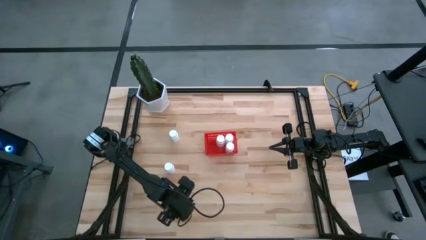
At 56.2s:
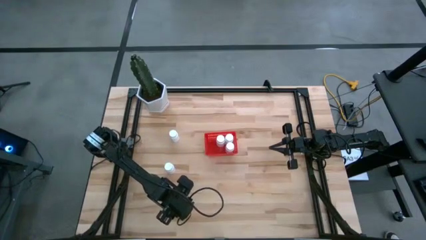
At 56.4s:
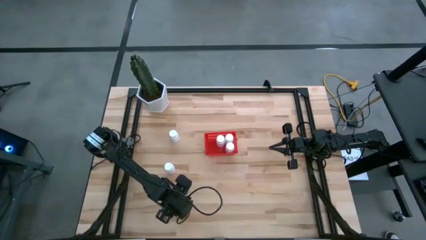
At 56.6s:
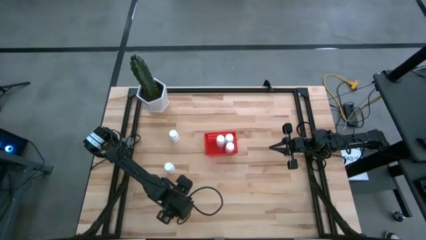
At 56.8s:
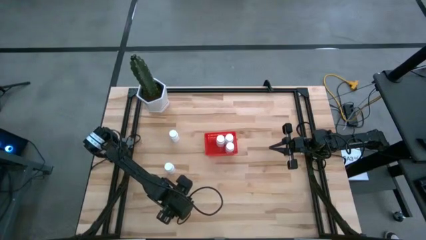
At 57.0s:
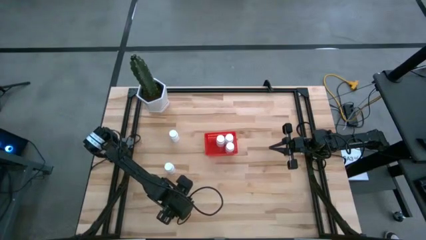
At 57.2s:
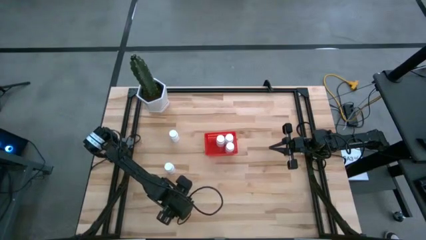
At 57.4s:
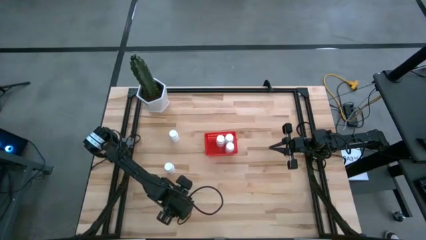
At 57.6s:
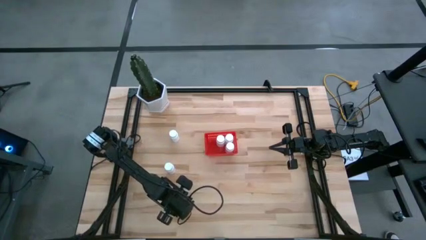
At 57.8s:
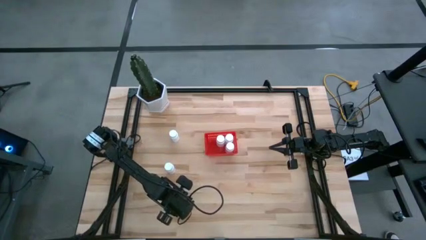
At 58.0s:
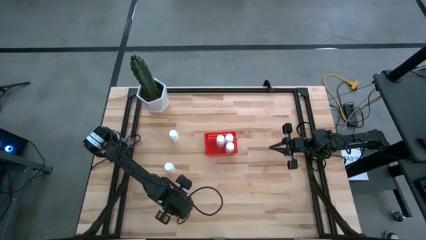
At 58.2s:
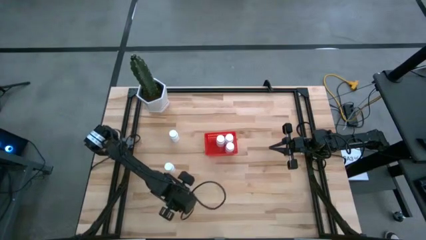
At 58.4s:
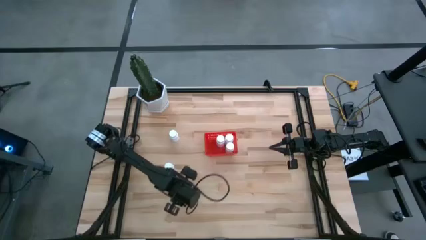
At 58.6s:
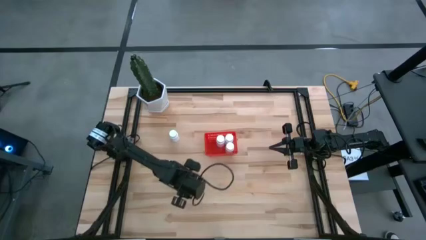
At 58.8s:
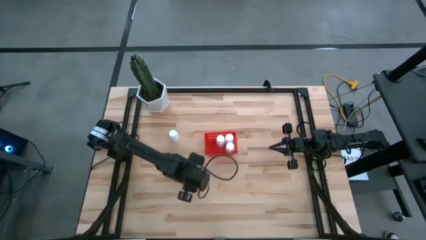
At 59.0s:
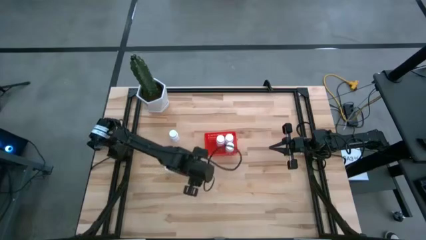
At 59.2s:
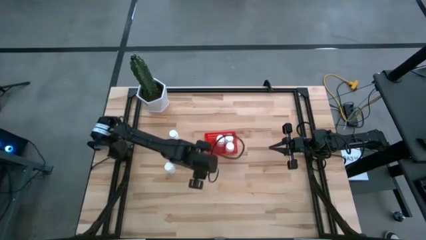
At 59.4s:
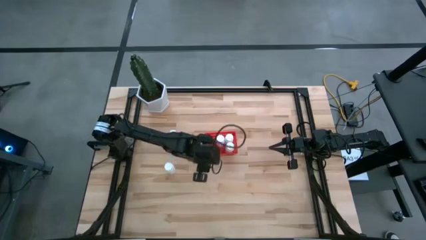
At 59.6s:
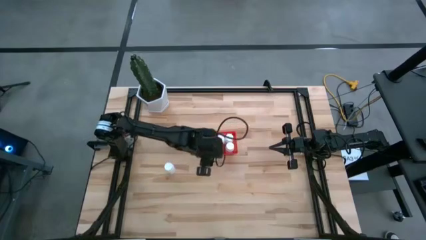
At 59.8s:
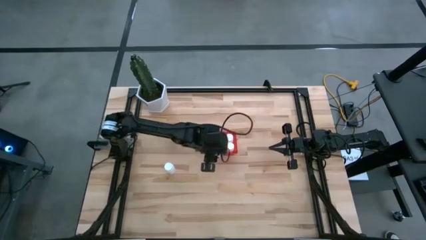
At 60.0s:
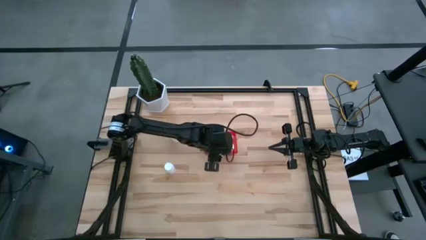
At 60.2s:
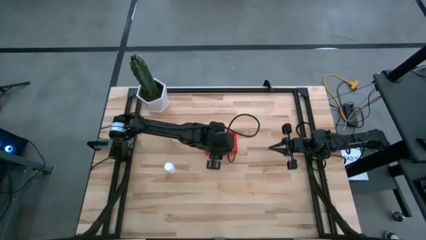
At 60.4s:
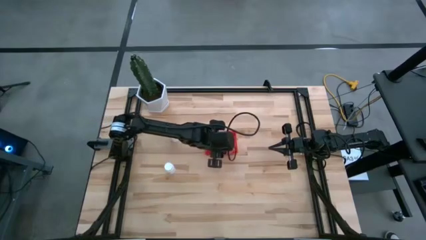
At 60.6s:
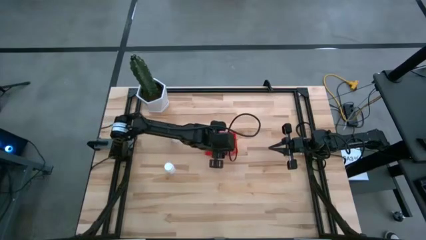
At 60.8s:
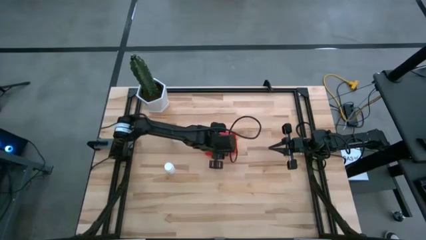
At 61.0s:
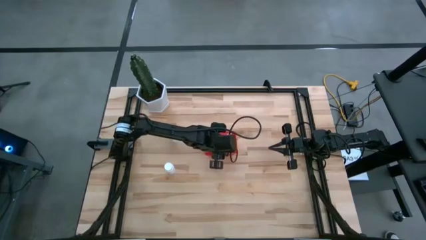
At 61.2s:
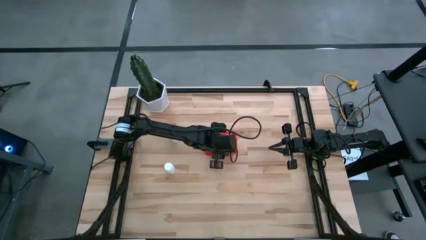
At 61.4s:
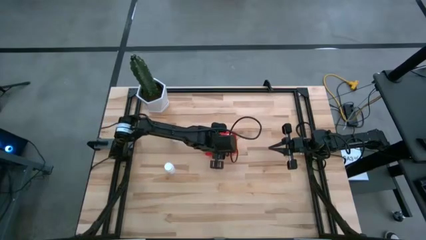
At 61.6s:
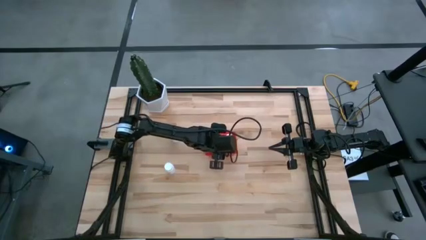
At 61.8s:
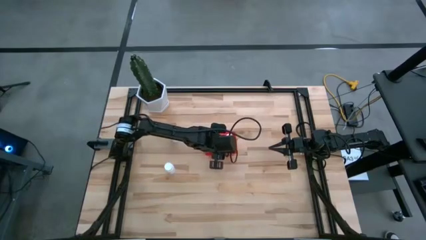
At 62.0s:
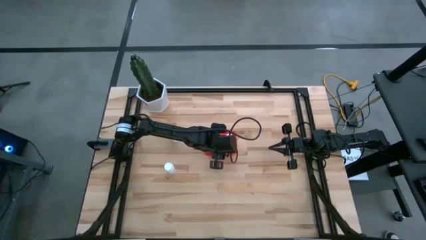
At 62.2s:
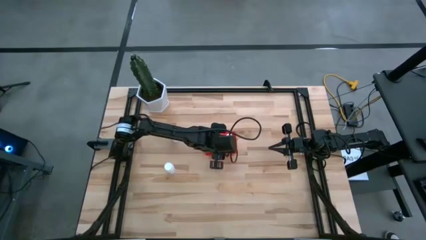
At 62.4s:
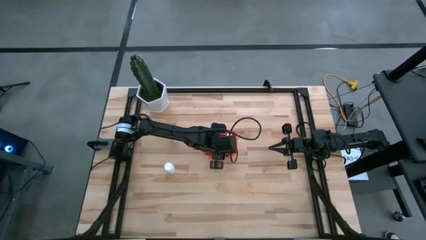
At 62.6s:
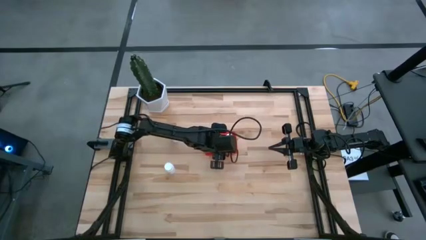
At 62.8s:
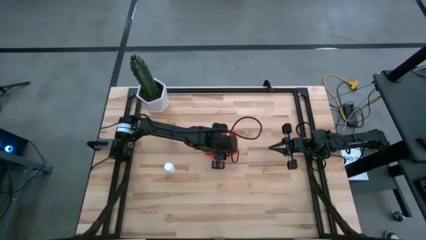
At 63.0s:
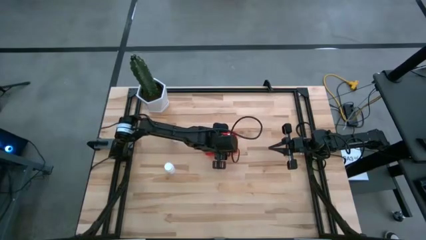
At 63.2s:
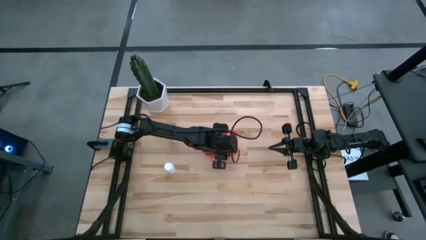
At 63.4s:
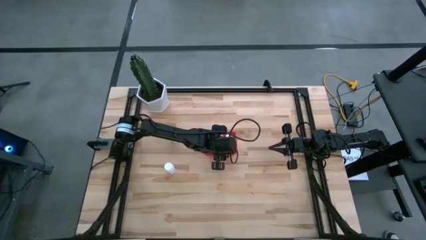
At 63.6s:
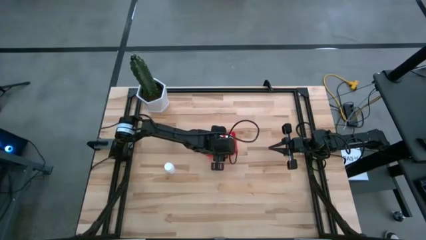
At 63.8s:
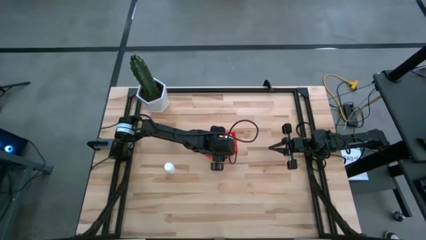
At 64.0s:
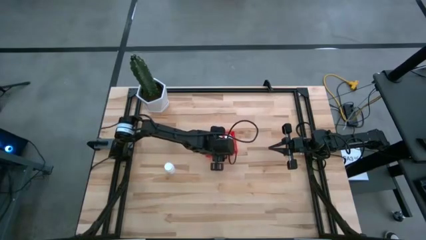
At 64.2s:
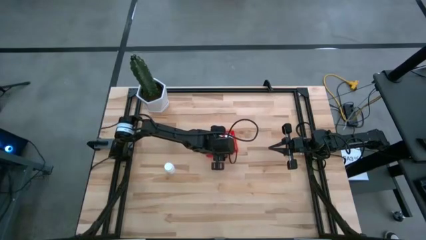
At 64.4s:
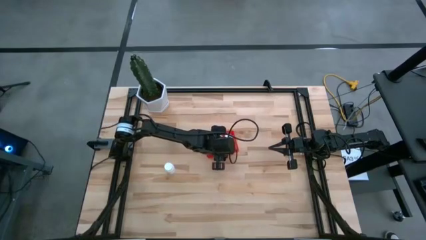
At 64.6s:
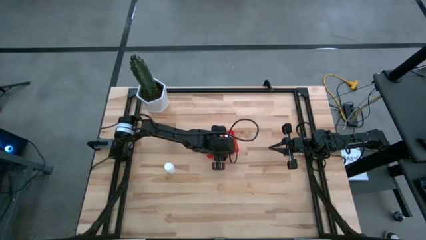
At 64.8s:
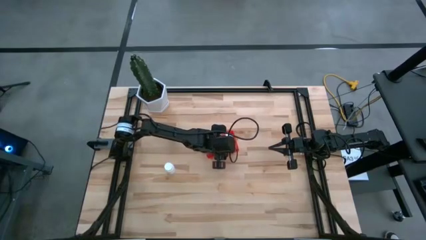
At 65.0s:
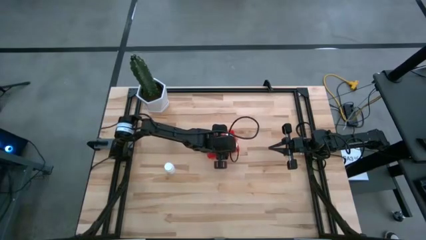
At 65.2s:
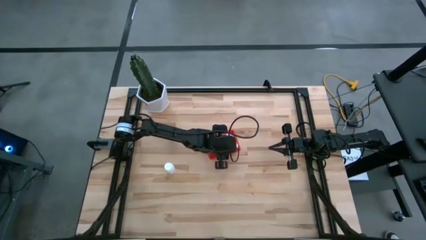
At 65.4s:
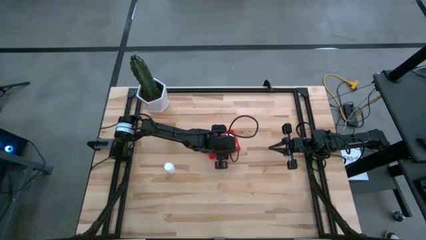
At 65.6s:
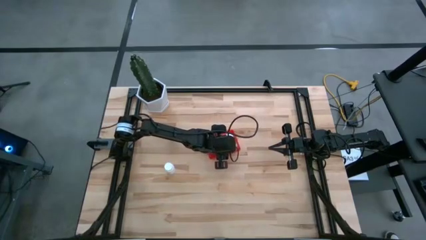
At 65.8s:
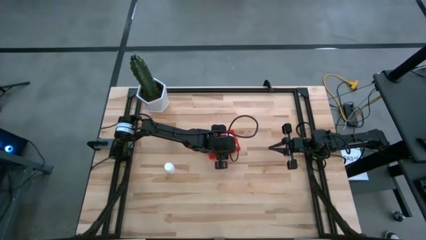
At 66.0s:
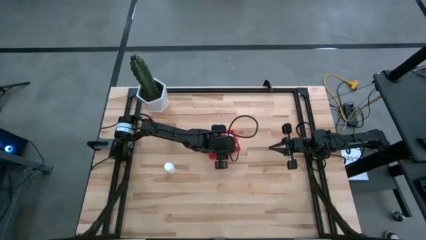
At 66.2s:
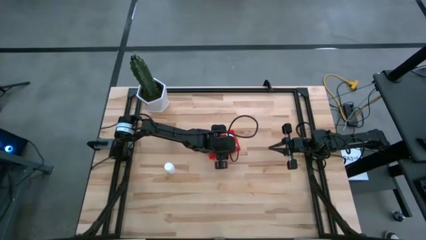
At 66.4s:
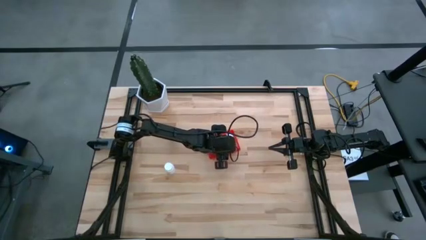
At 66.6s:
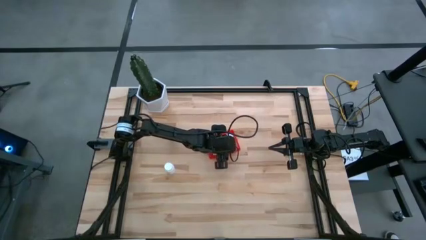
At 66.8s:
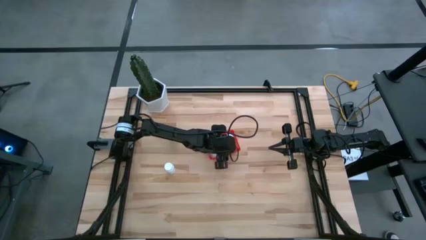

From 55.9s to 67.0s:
Task: Pick and place pill bottles into a basket
Put the white pill bottle into the red bin

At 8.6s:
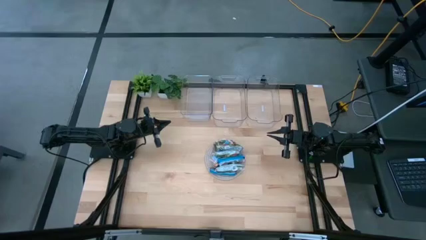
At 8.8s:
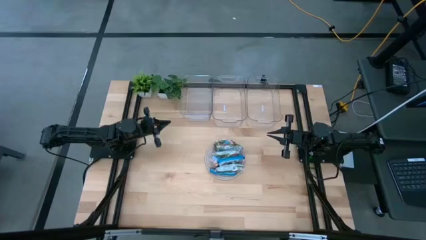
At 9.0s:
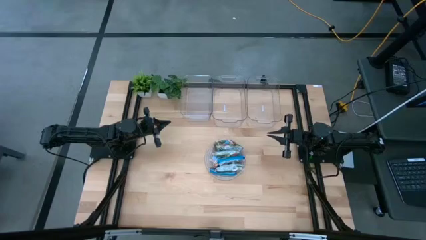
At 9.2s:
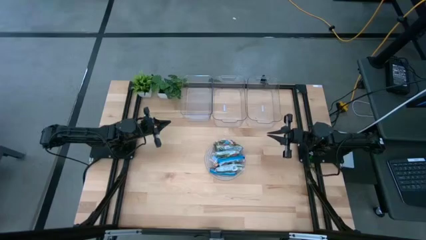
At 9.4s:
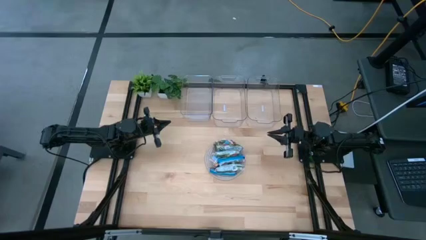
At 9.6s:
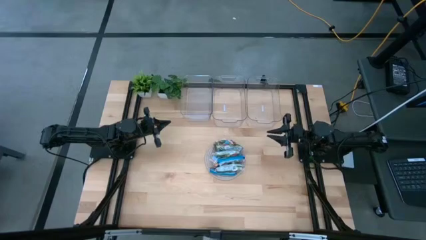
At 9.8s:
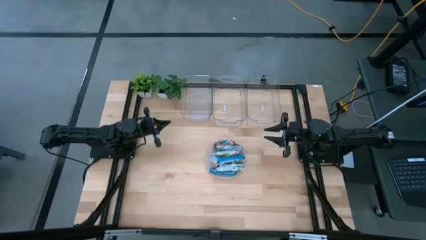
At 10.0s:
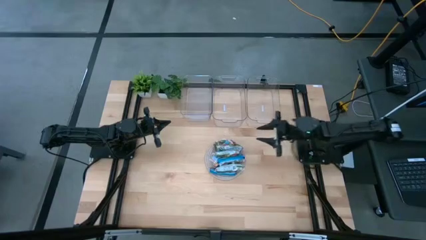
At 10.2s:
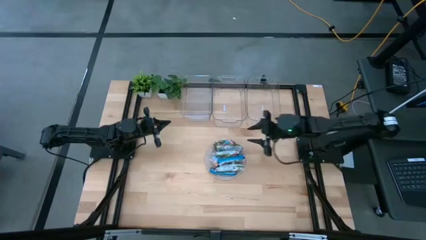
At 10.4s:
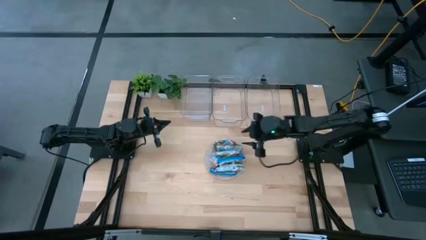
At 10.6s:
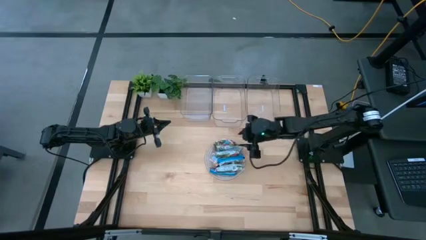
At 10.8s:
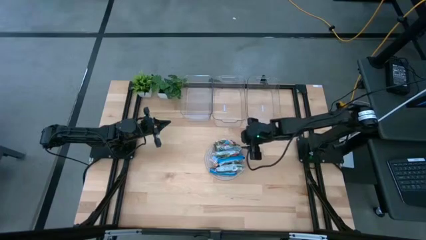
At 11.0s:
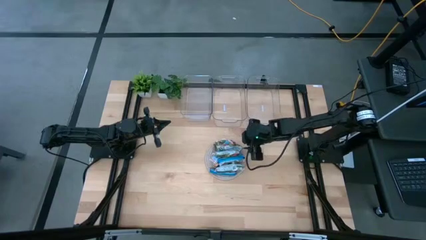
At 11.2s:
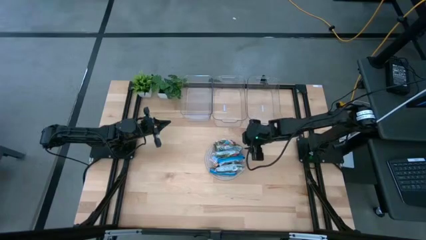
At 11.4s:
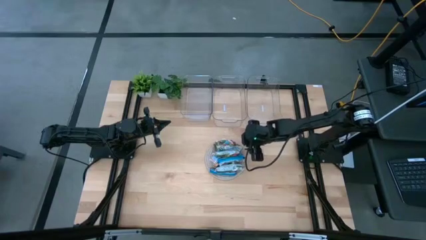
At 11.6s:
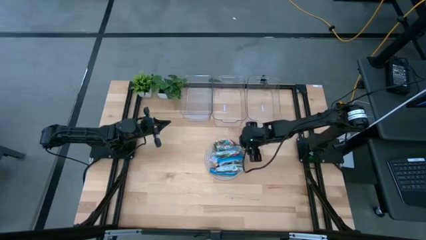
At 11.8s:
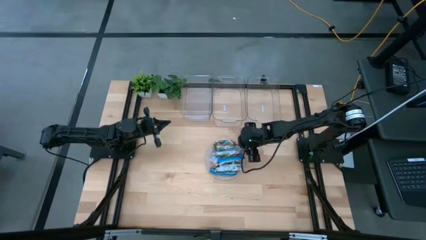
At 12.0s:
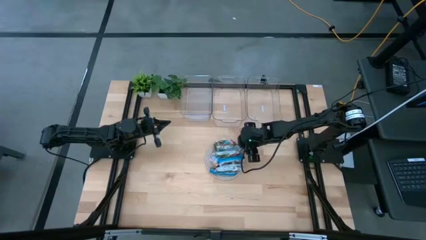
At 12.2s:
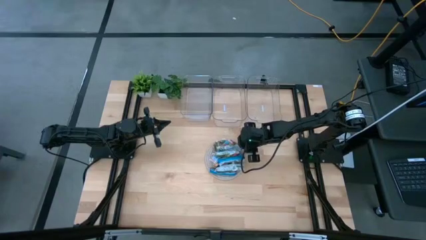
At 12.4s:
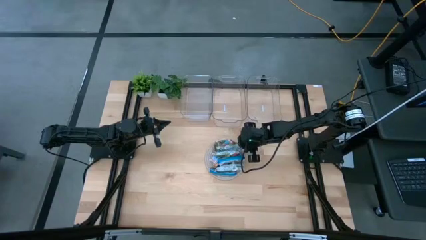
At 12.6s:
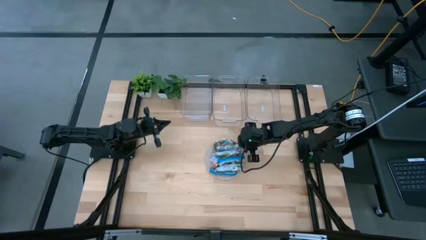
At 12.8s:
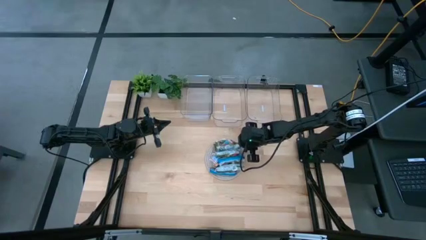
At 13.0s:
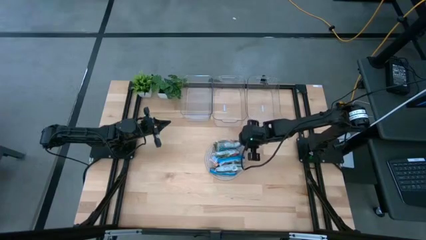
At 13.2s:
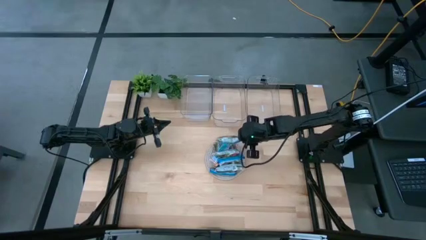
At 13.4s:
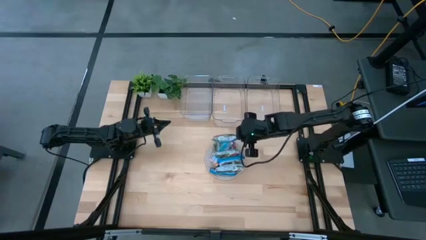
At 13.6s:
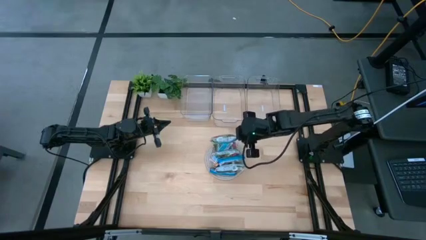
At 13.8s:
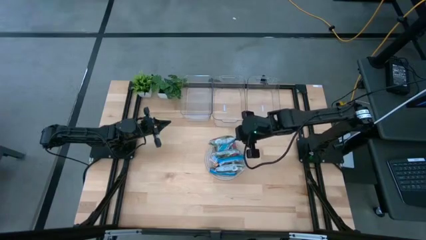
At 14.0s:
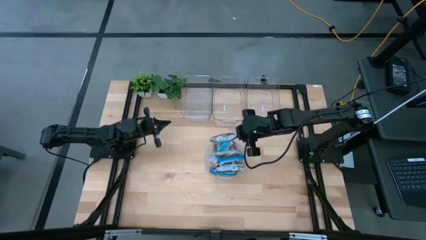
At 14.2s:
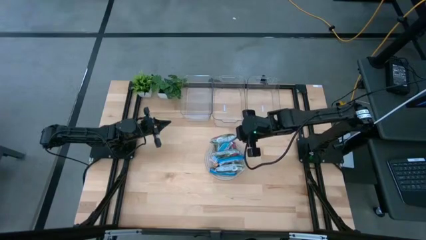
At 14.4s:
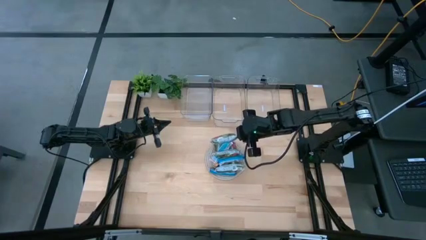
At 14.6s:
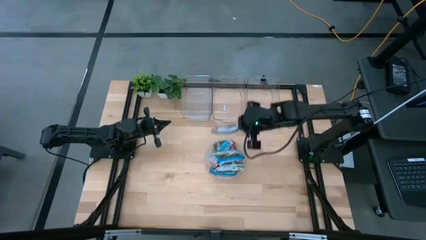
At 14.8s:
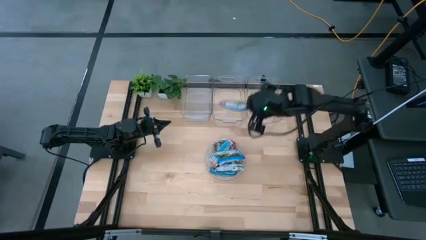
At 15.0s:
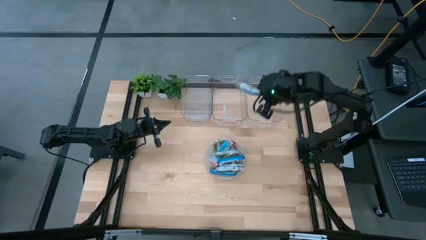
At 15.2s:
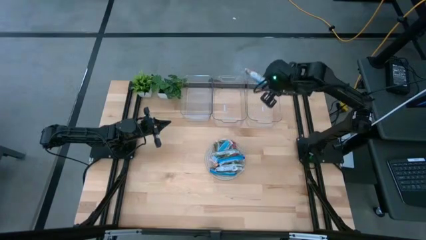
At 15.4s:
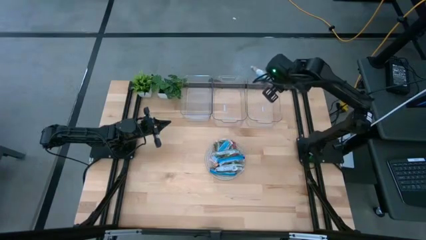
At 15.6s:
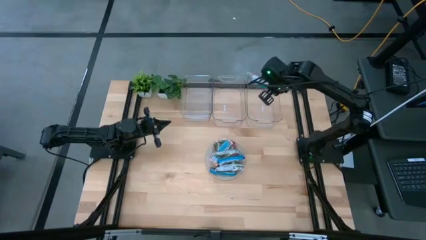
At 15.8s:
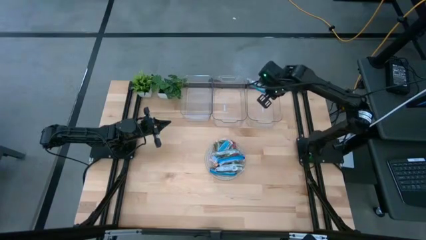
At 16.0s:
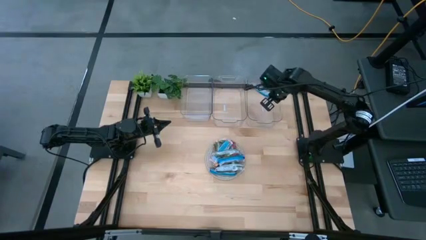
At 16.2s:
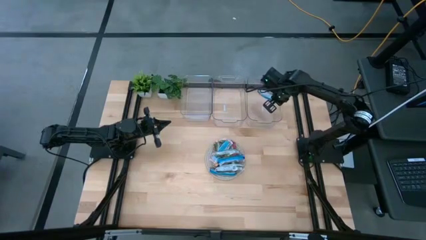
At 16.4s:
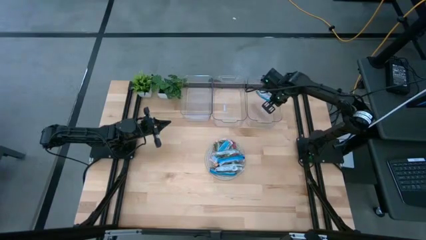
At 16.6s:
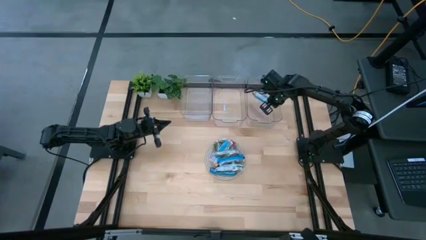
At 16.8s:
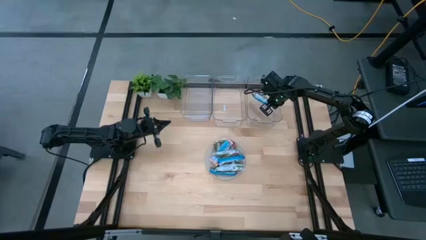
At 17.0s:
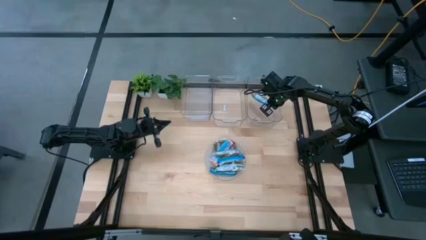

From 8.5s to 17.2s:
Task: Pick and place Granola Bars by type
Put the red granola bar into the right transparent bin
